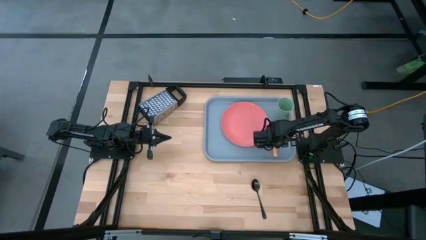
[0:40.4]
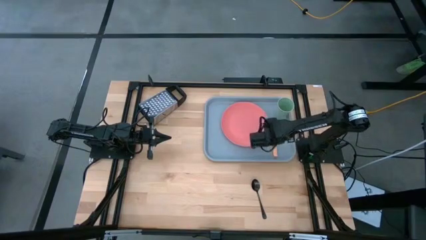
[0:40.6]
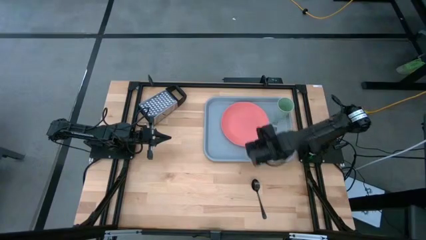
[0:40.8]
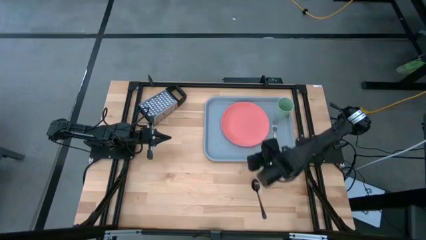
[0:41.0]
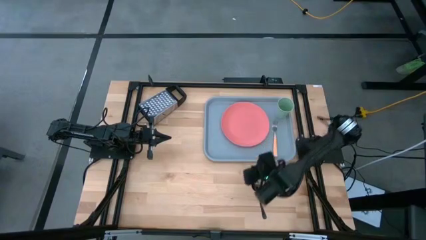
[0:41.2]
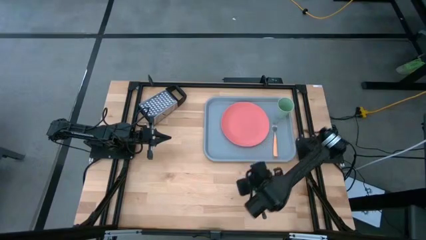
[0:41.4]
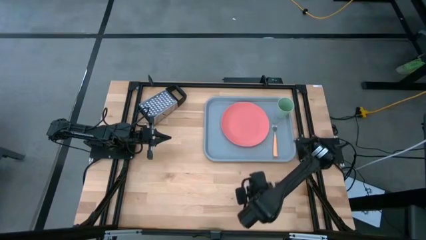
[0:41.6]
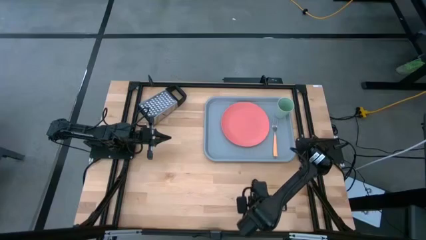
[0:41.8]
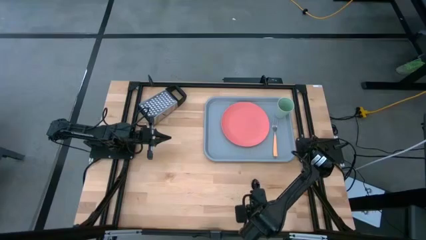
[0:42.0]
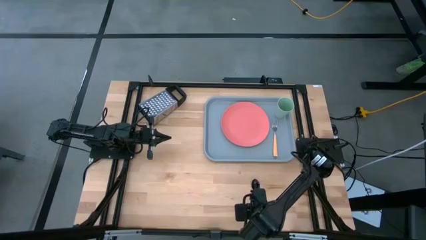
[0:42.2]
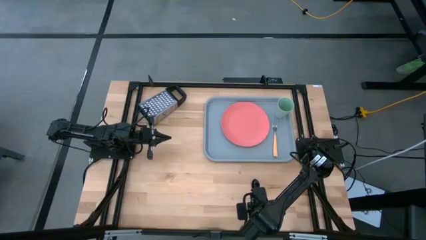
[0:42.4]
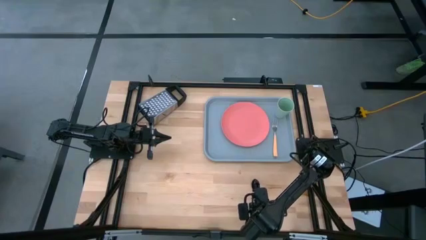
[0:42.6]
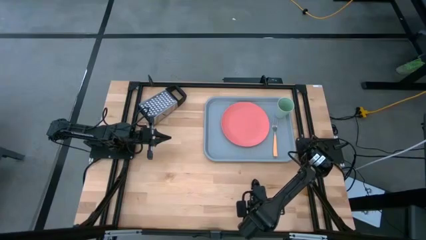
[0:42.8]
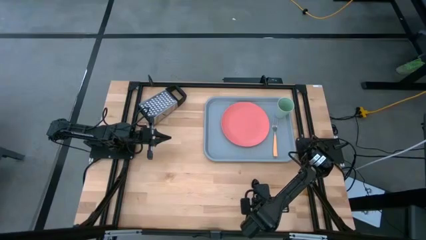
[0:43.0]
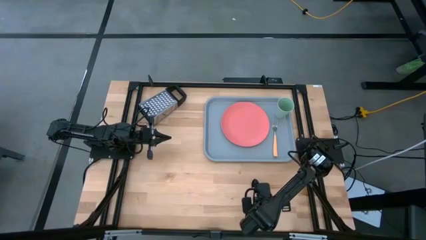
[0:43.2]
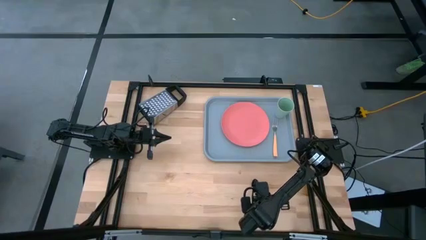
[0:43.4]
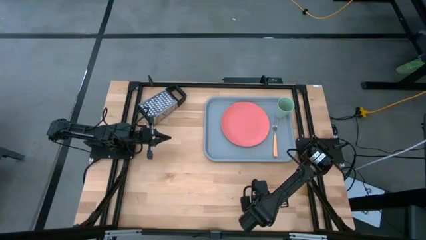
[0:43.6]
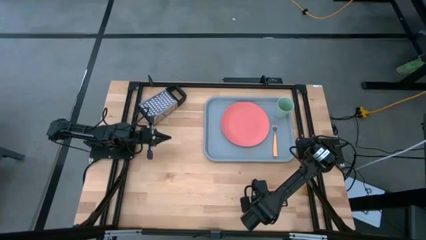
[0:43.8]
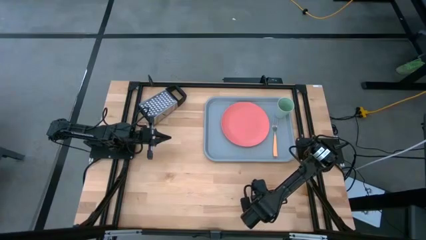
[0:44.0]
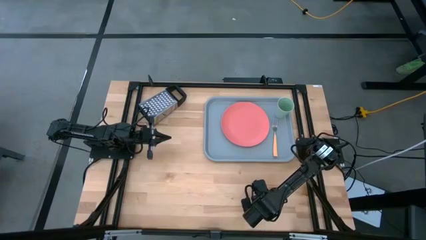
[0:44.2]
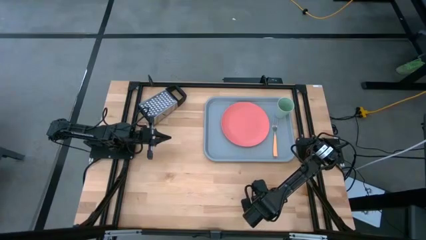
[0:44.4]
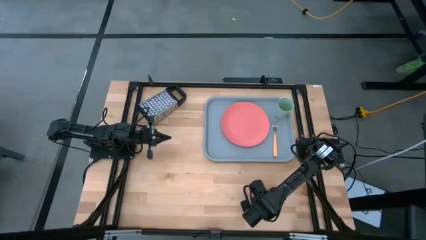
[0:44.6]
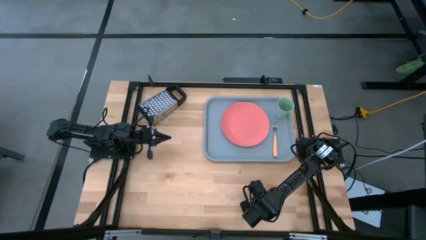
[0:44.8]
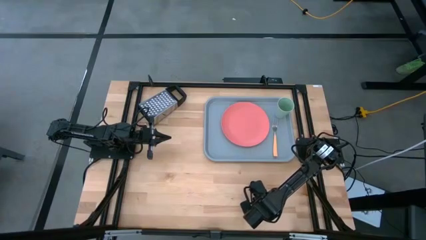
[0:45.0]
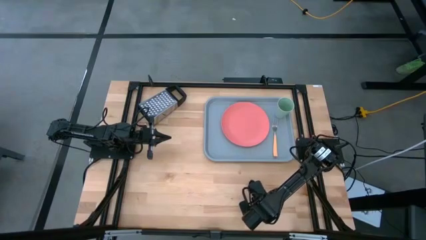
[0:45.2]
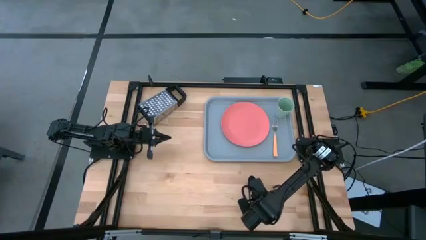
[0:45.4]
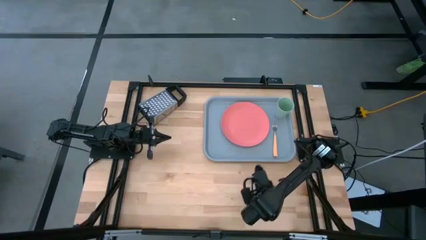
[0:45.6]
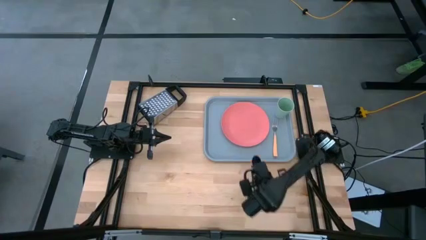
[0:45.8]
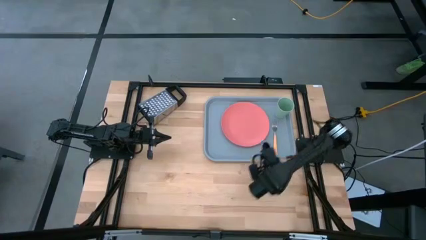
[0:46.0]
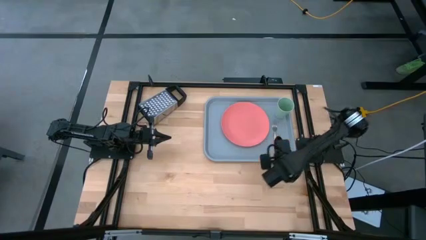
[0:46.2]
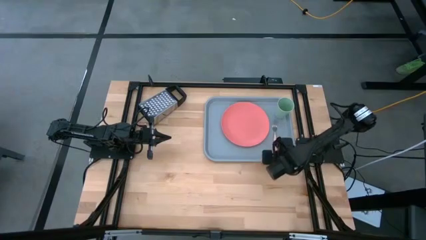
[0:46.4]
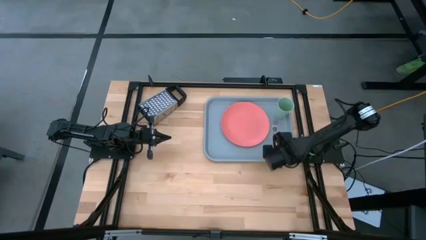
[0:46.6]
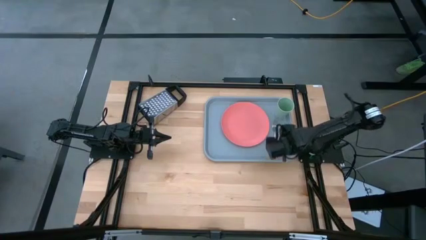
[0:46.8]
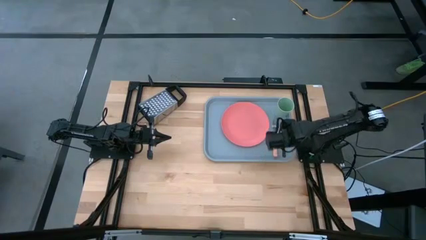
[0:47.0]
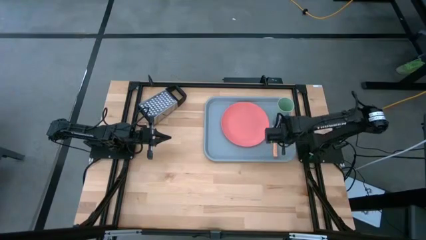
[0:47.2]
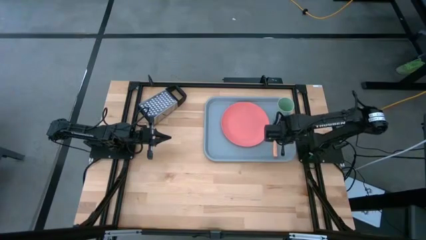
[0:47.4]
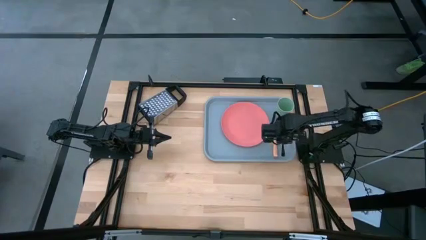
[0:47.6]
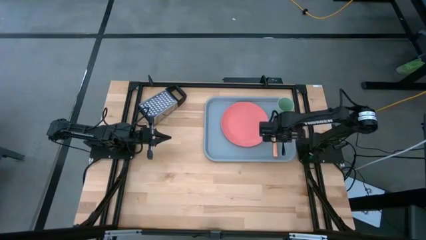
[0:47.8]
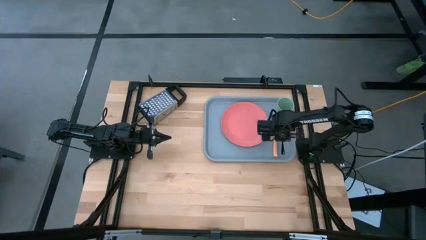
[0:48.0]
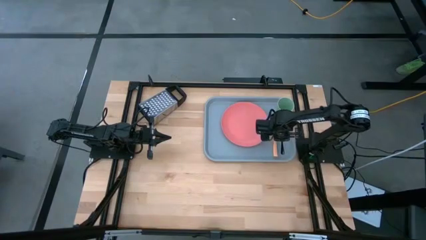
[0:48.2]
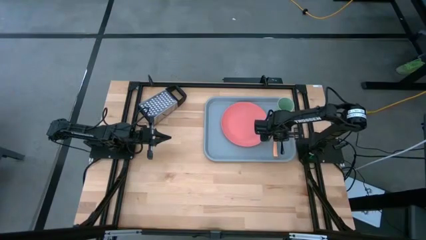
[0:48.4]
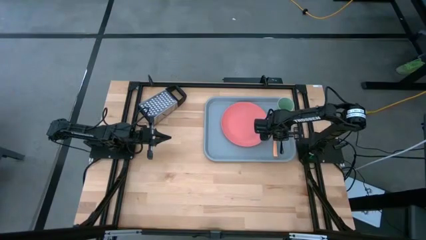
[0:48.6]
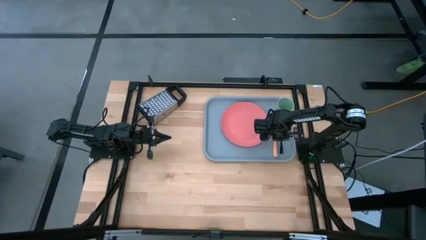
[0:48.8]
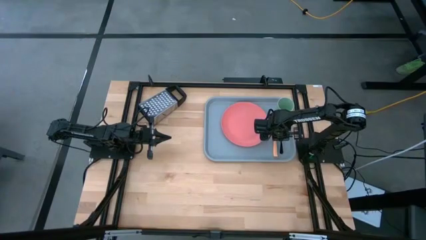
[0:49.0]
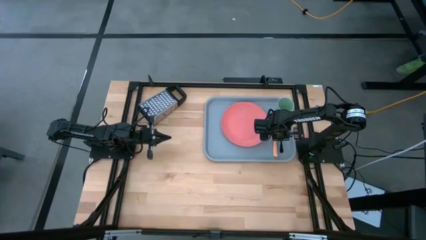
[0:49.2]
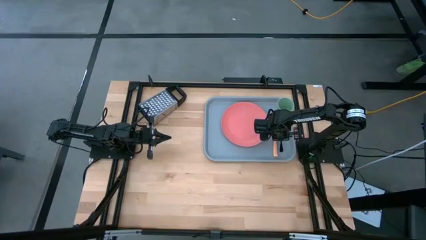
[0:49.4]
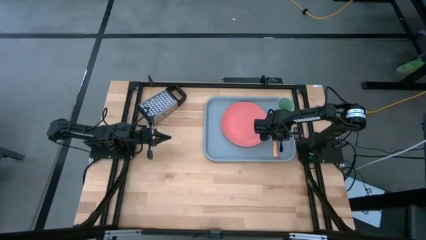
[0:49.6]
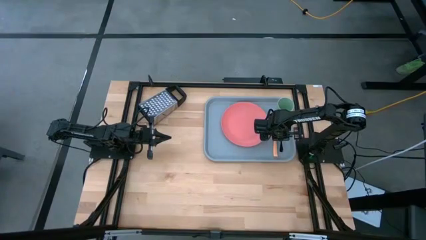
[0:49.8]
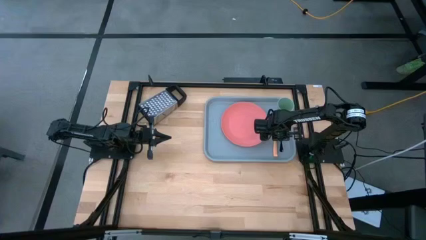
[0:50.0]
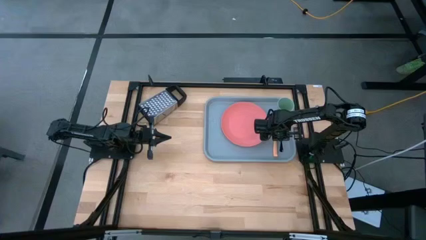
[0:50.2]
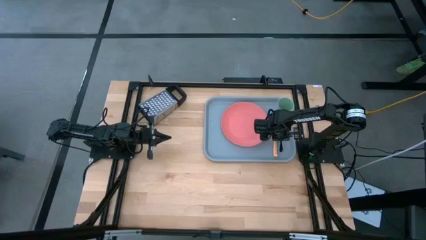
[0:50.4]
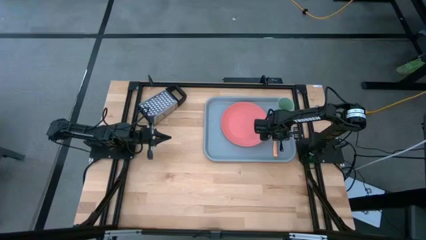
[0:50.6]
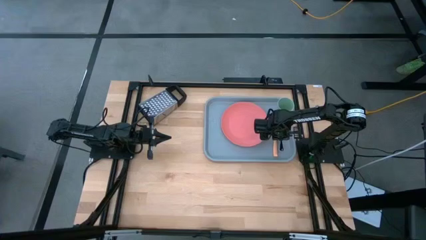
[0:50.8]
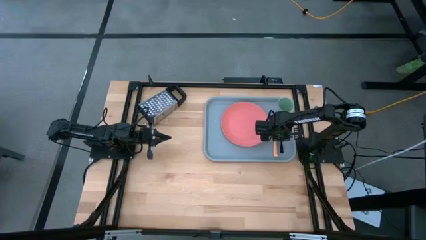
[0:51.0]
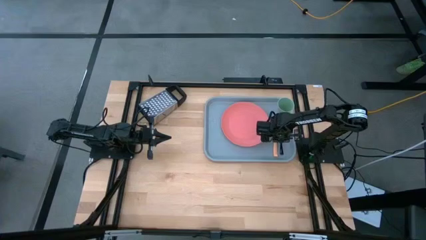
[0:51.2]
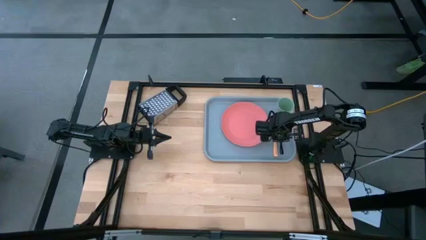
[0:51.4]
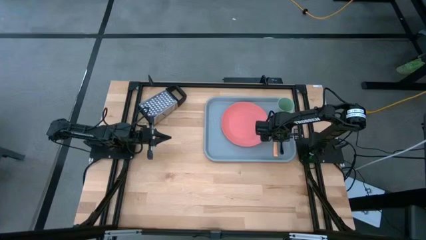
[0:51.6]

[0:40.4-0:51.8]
Task: Pick and place plate/cup/fork/spoon on tray
Put the black spoon on the gray serving tray to the right side of the orange fork

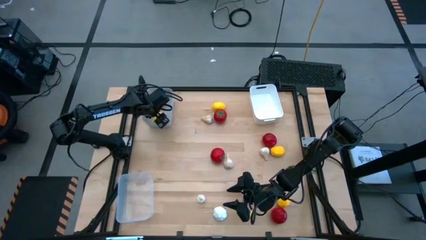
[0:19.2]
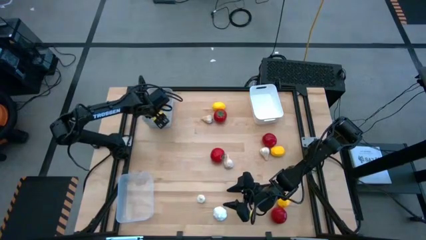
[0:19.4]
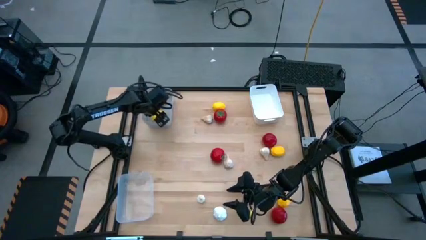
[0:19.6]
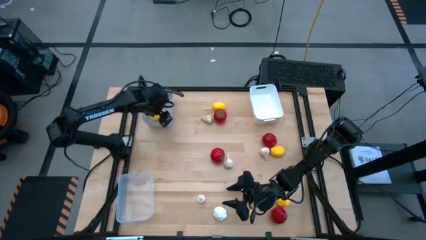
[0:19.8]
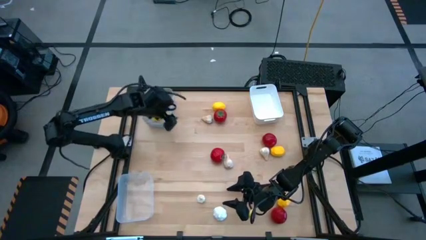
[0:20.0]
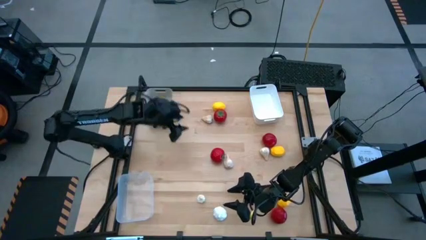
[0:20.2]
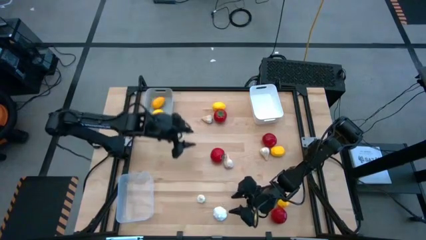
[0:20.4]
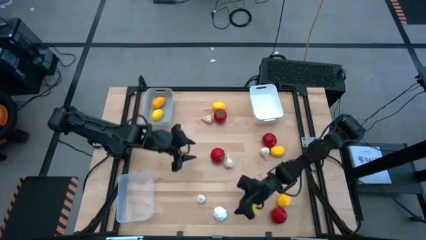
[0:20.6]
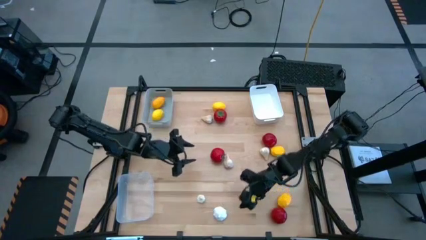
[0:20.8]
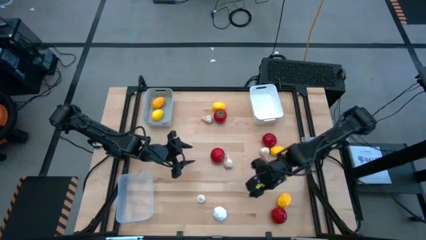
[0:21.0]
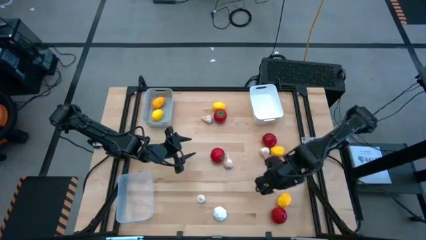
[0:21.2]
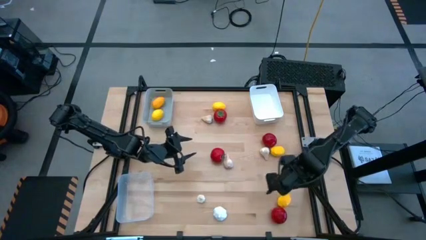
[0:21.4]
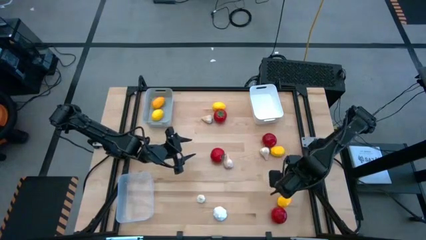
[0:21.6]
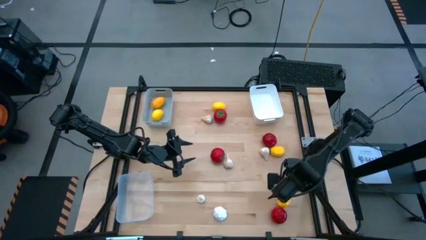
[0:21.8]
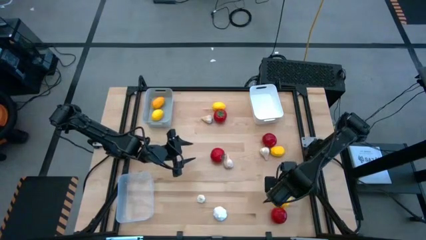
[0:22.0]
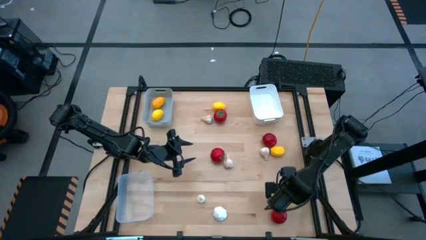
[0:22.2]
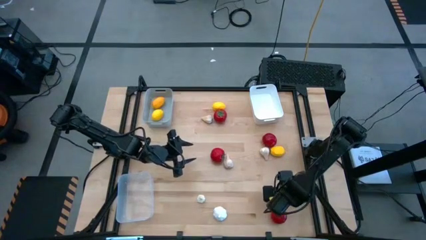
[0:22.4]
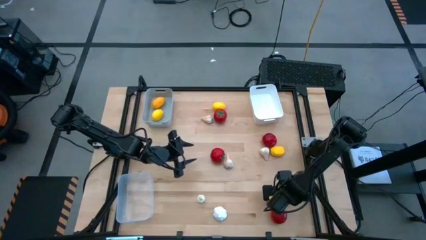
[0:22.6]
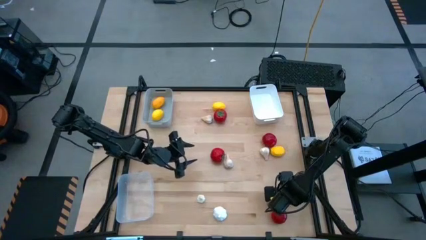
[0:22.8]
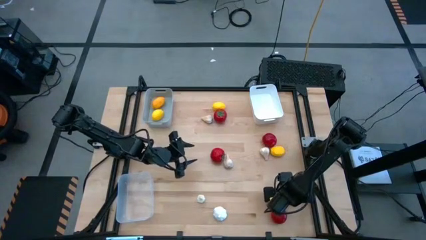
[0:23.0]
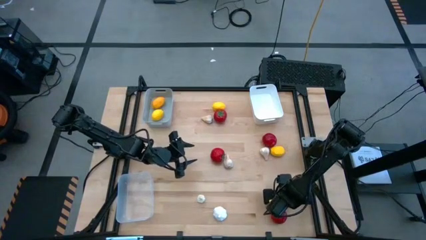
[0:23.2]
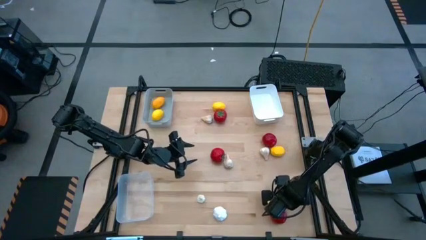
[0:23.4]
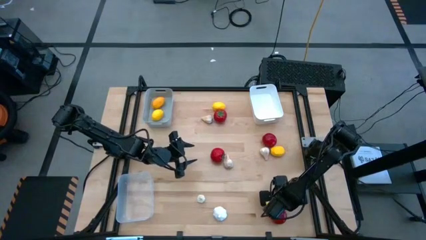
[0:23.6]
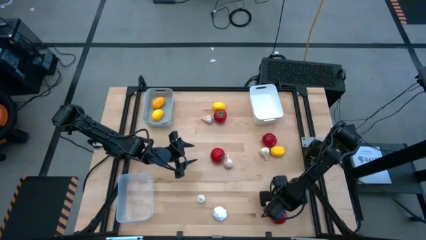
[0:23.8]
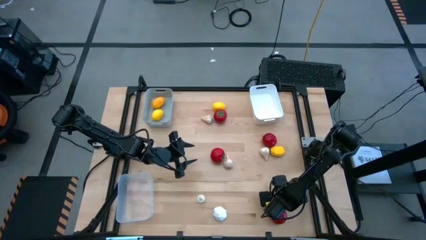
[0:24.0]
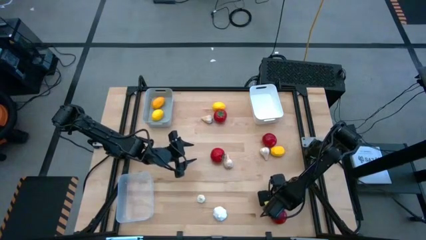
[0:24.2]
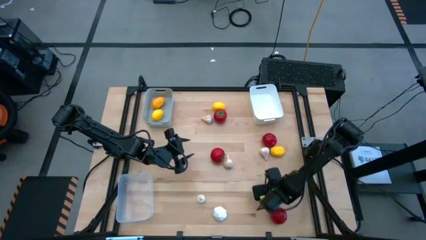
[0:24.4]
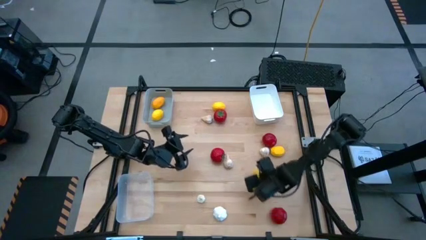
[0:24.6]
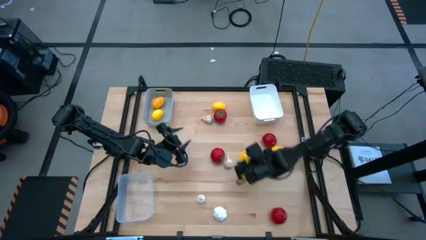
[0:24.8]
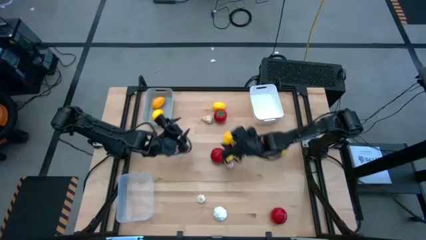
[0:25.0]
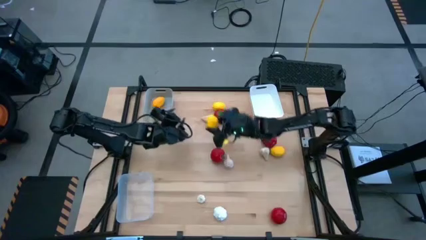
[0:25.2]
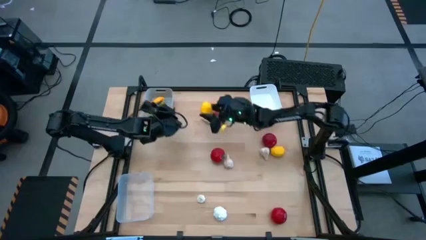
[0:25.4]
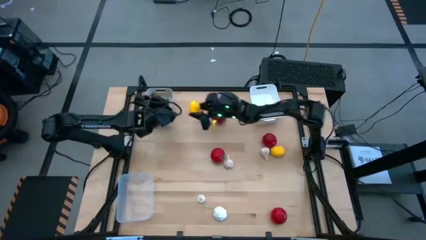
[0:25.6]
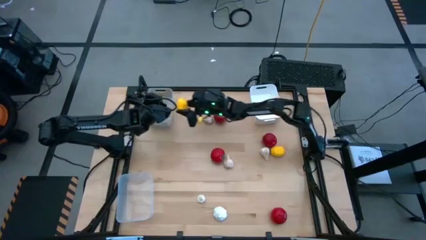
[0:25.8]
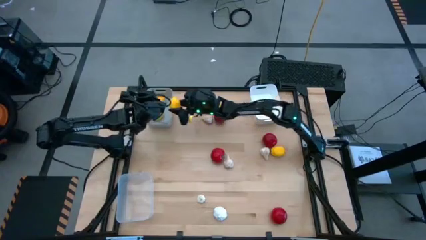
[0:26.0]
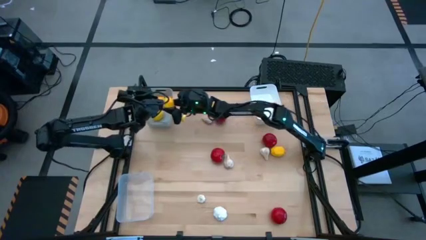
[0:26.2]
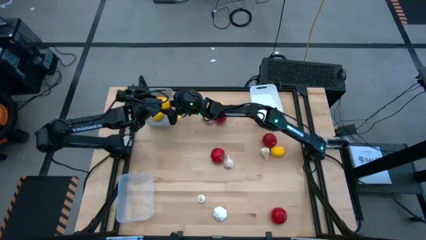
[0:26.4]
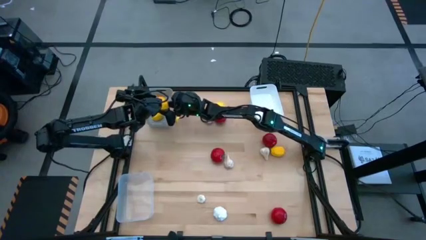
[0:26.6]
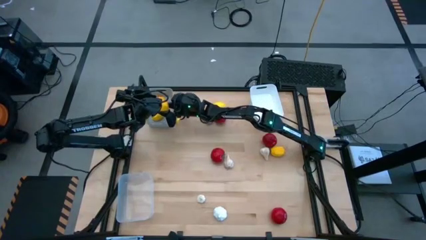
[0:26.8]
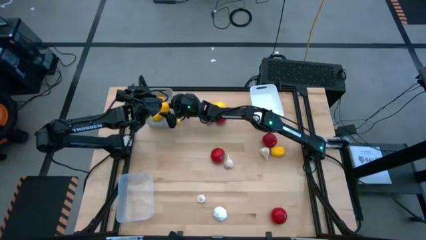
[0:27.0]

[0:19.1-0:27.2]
Task: Sort produce into baskets
Put the yellow lemon into the gray bin
